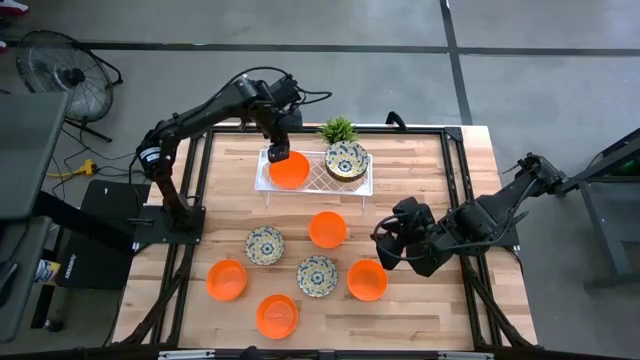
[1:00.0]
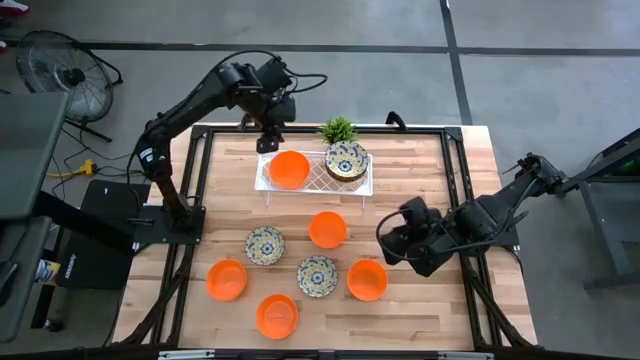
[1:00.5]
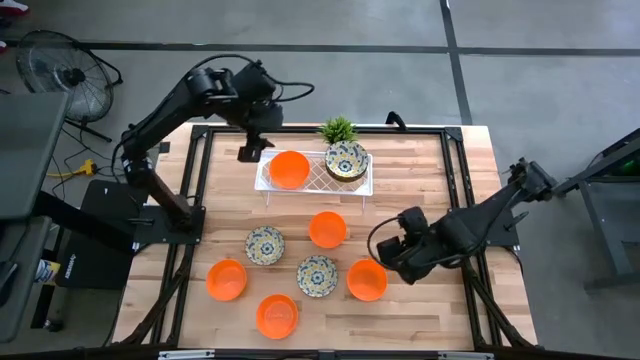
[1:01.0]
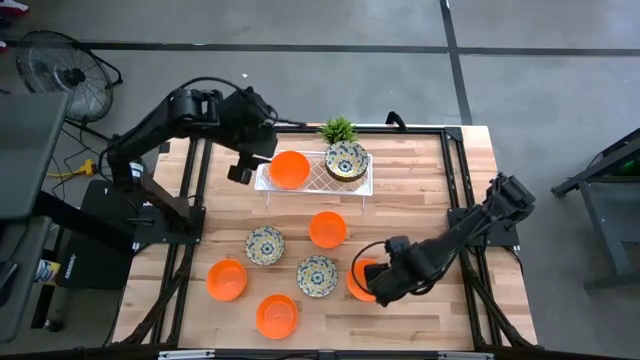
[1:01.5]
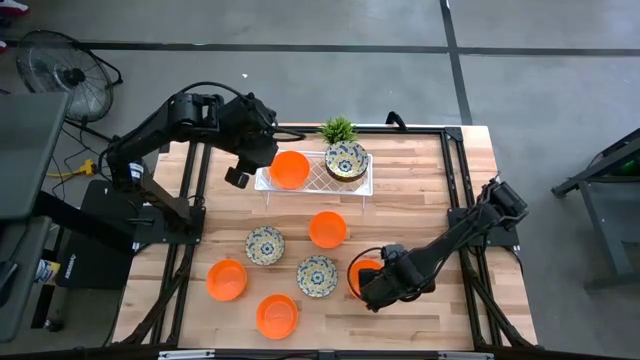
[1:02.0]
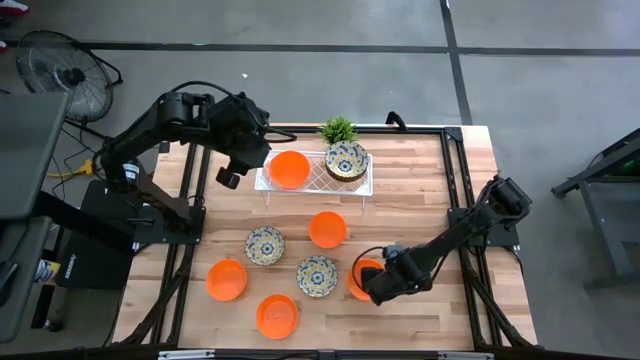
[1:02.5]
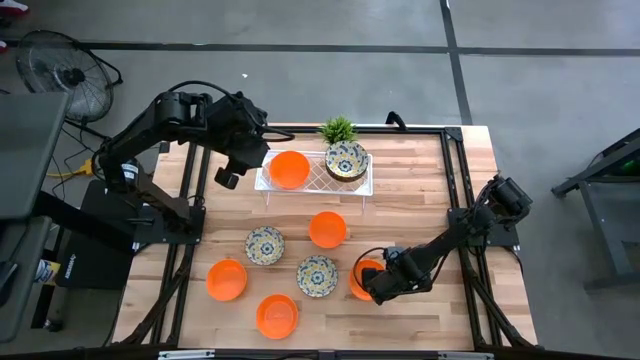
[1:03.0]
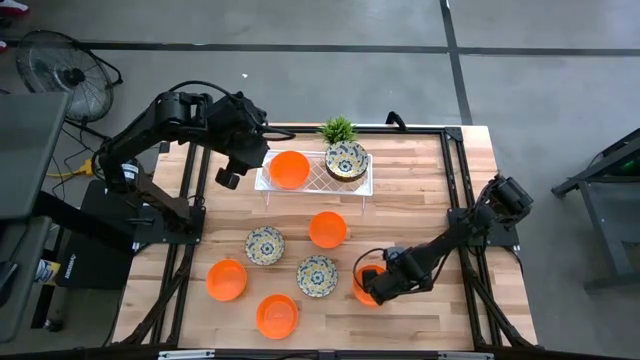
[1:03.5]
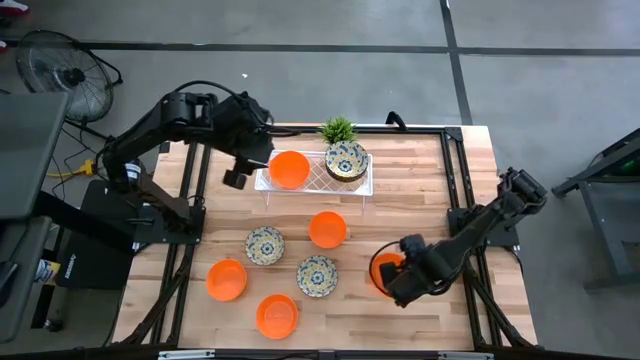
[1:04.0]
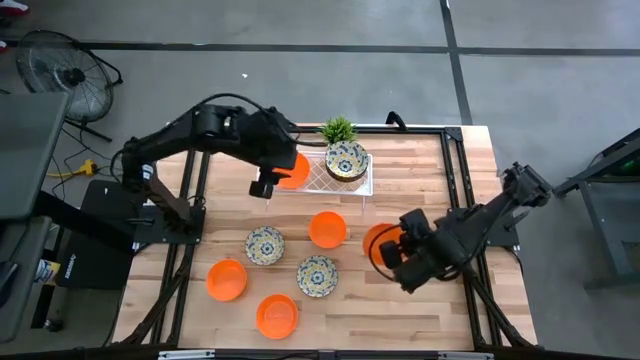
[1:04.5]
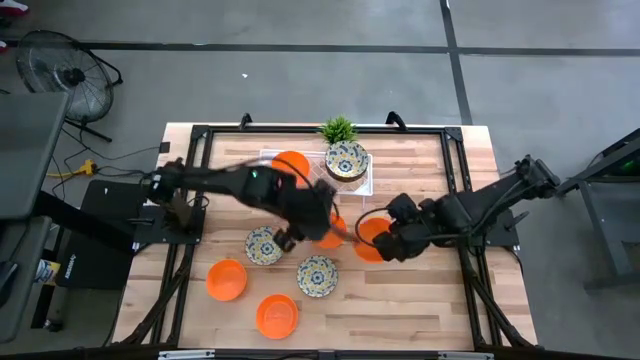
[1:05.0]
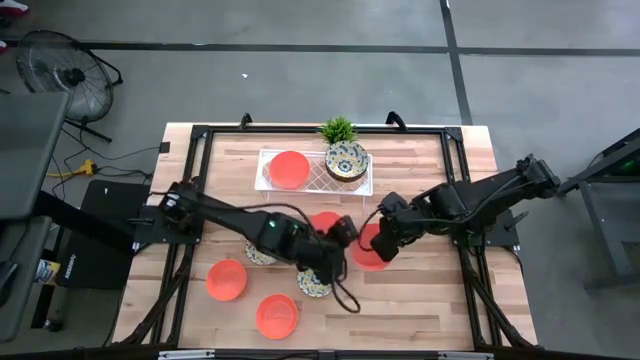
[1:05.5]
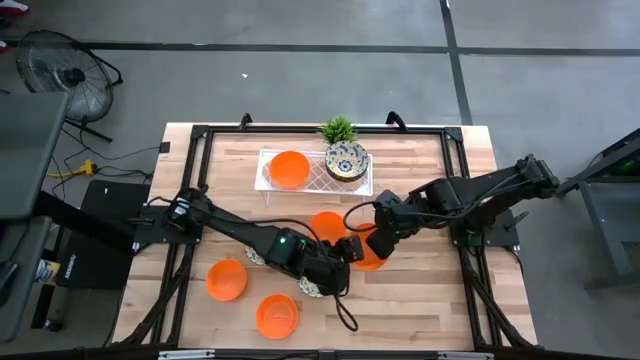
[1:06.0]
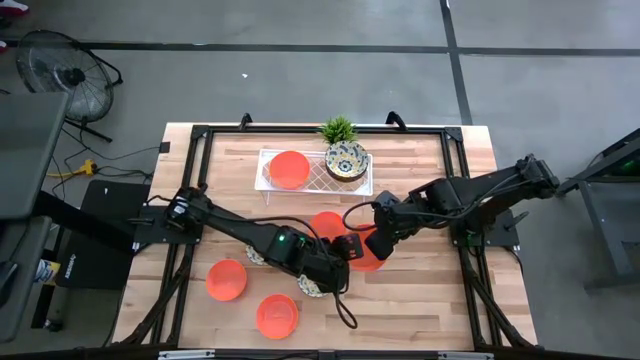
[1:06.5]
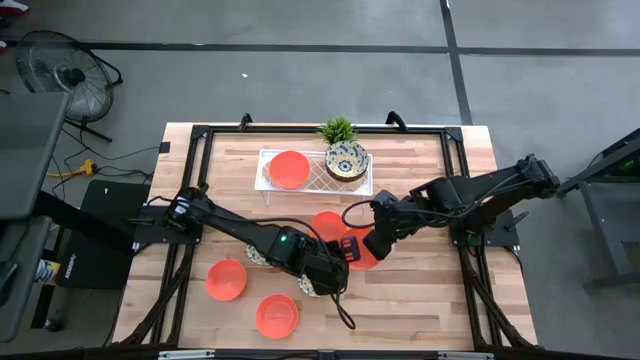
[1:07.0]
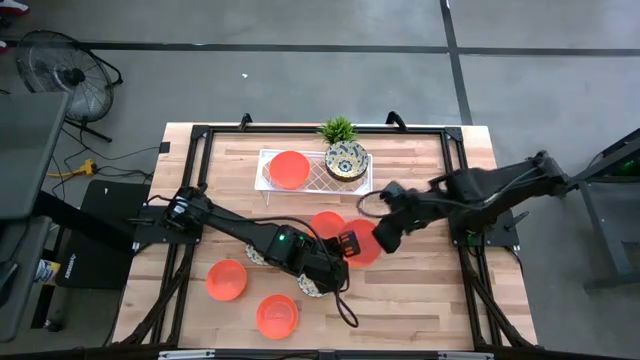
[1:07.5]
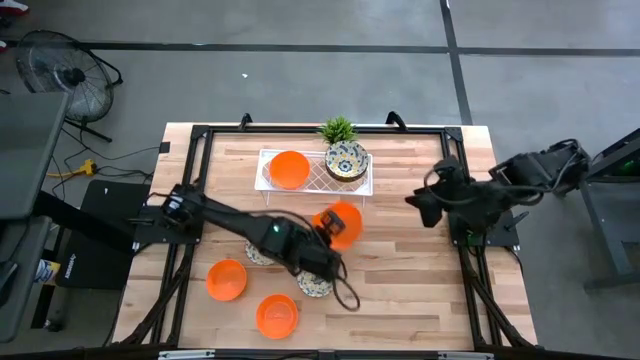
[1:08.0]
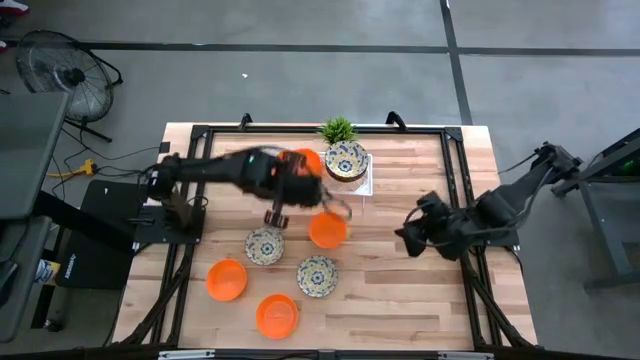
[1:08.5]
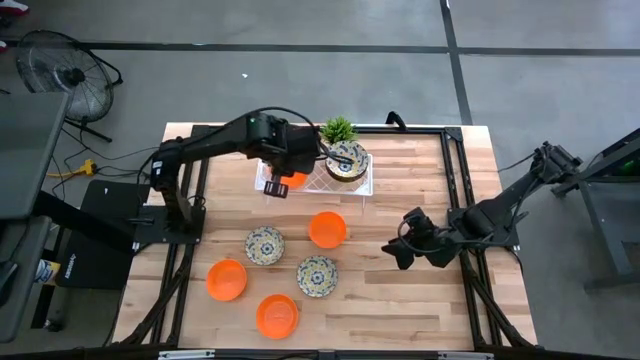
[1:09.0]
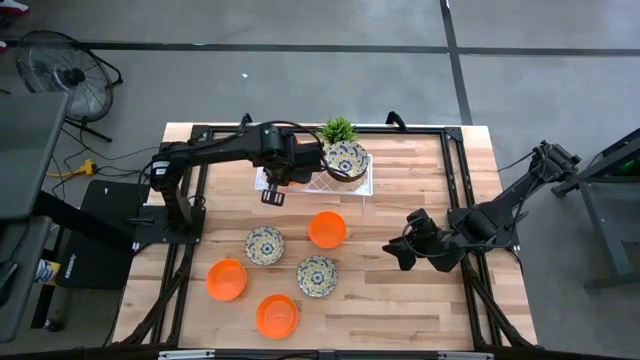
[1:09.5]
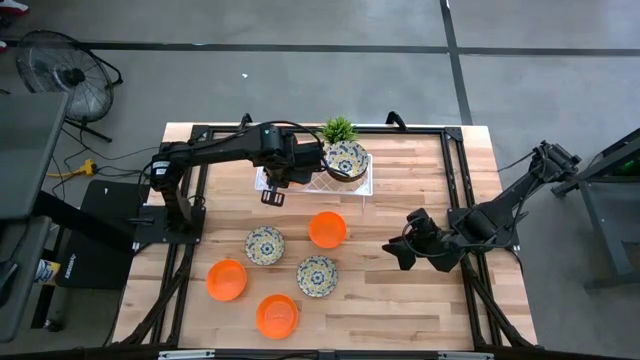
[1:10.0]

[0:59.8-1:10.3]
Task: Pick & Place Mini bowls
Stack the orange bowl on the orange bowl on the shelf

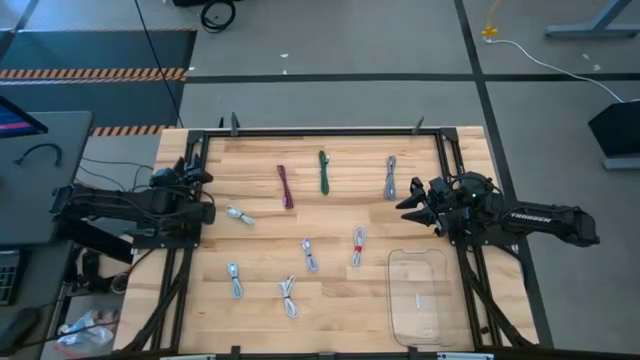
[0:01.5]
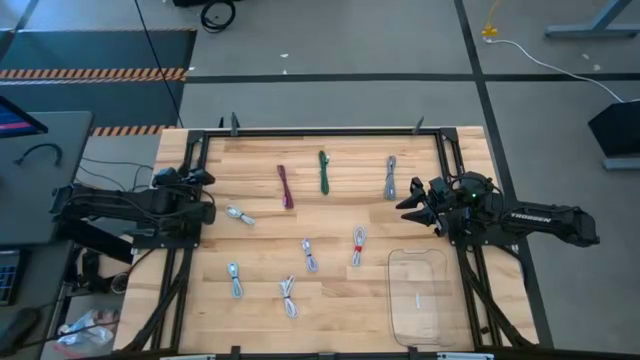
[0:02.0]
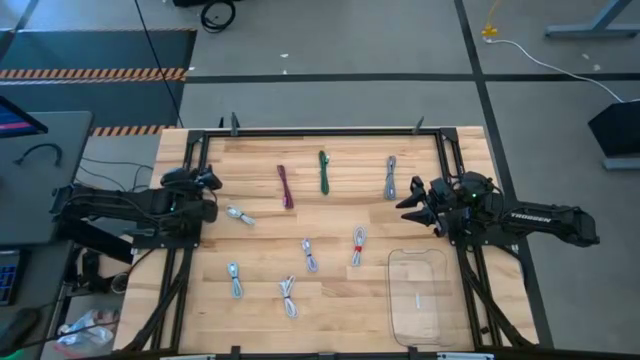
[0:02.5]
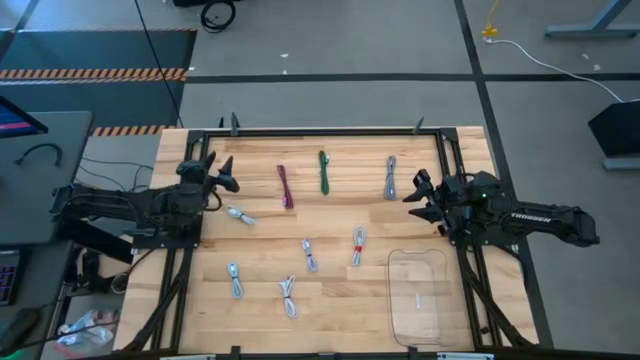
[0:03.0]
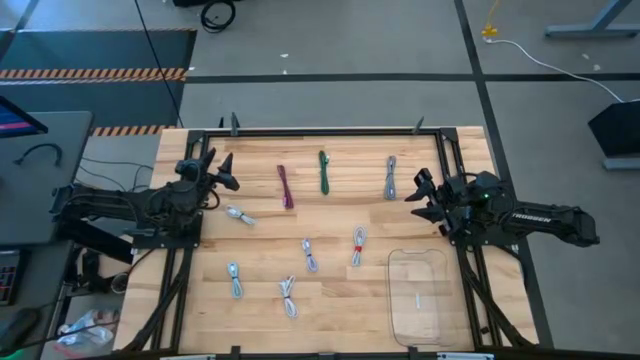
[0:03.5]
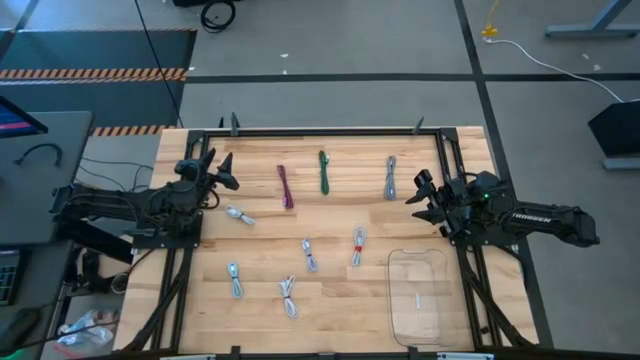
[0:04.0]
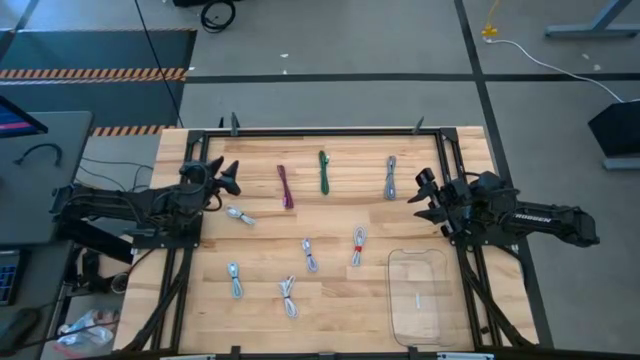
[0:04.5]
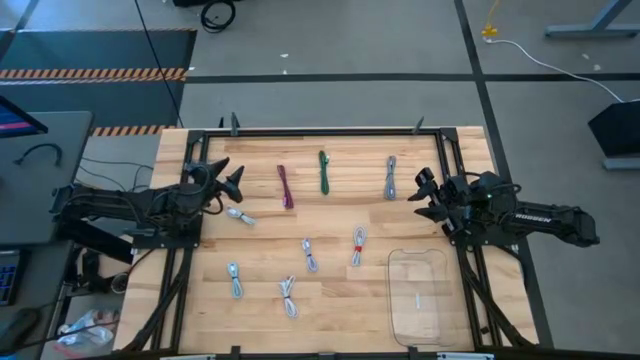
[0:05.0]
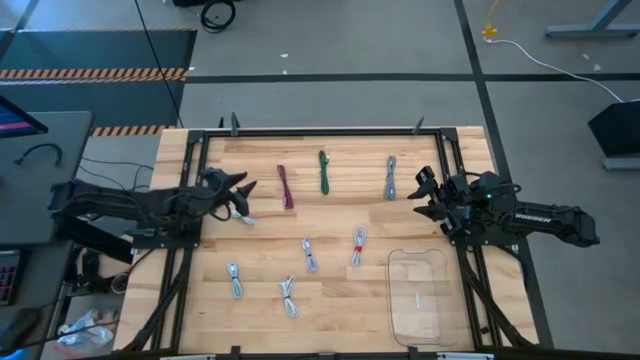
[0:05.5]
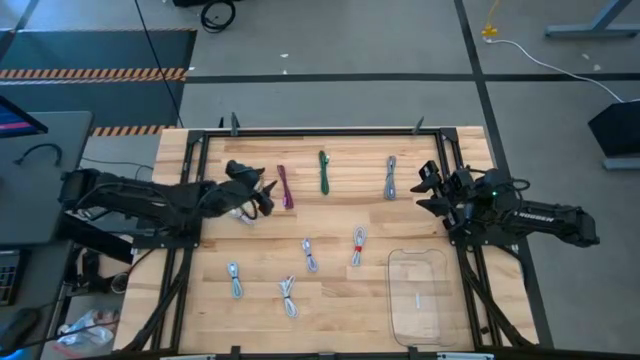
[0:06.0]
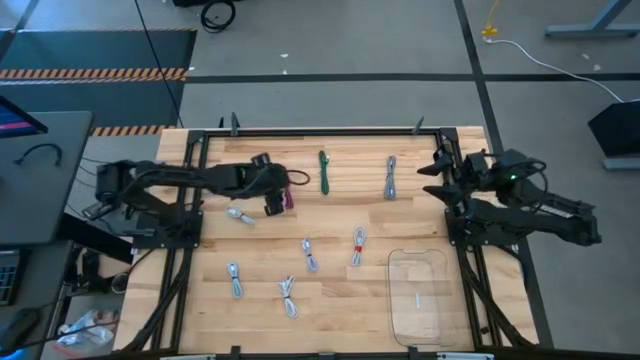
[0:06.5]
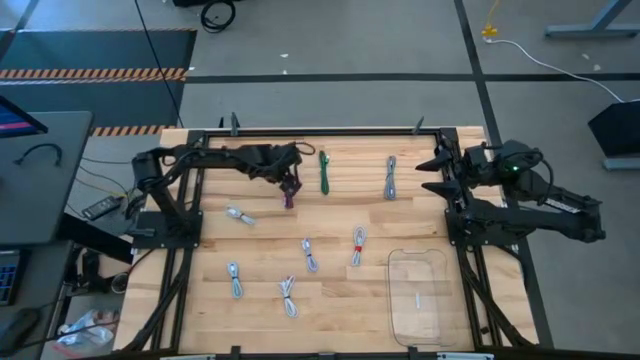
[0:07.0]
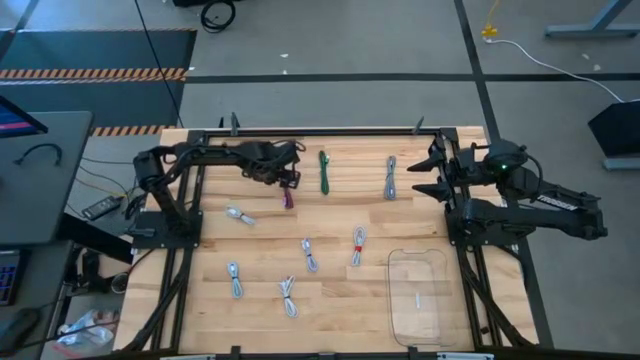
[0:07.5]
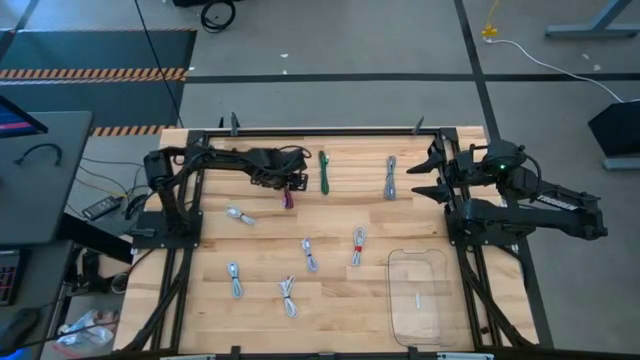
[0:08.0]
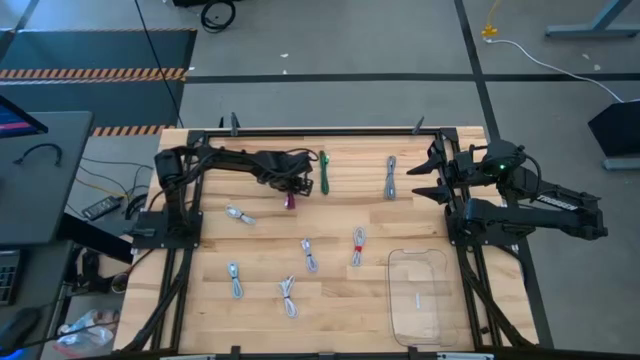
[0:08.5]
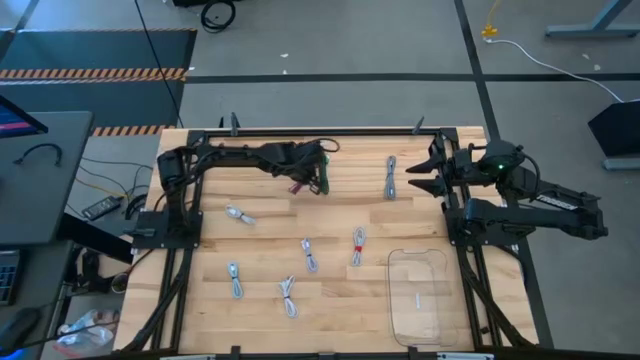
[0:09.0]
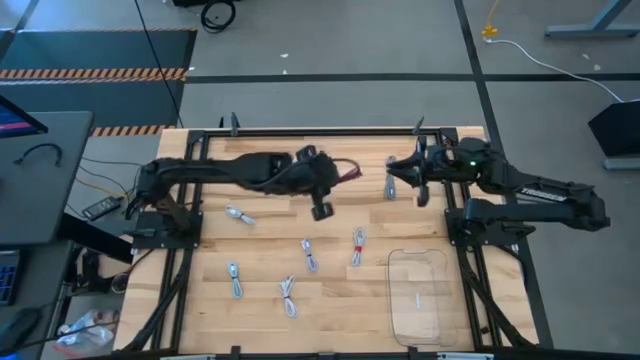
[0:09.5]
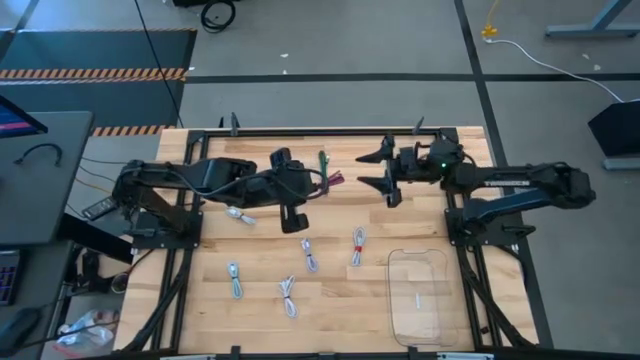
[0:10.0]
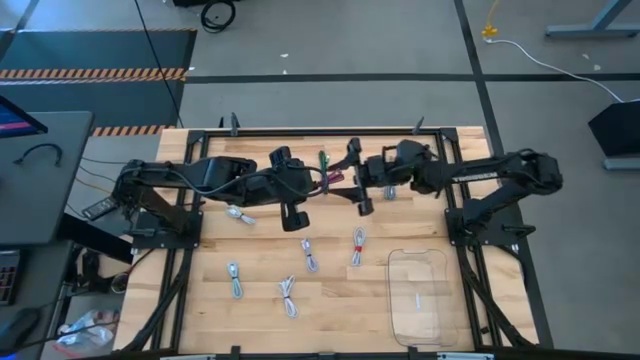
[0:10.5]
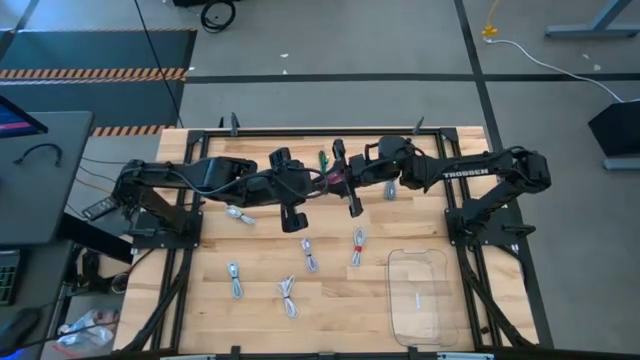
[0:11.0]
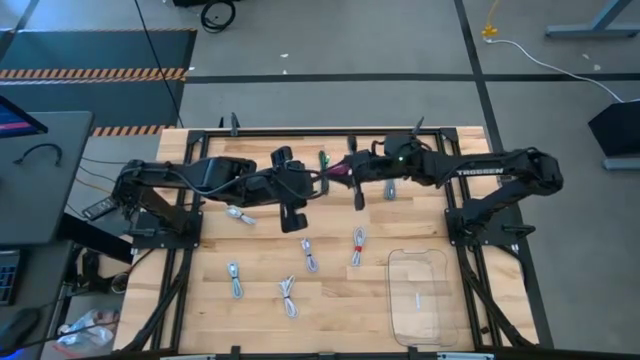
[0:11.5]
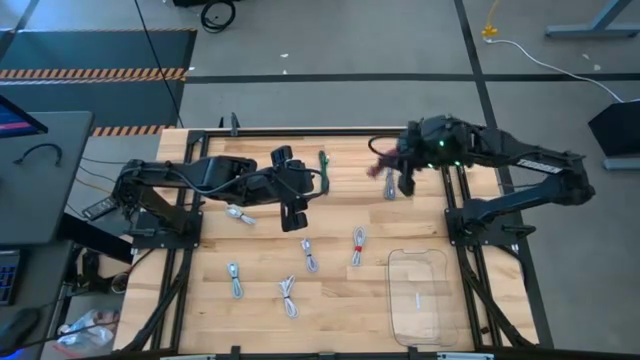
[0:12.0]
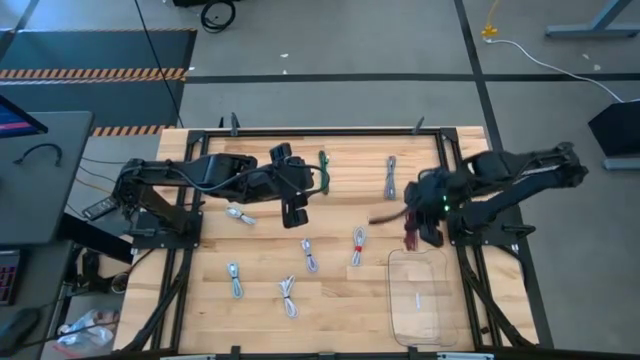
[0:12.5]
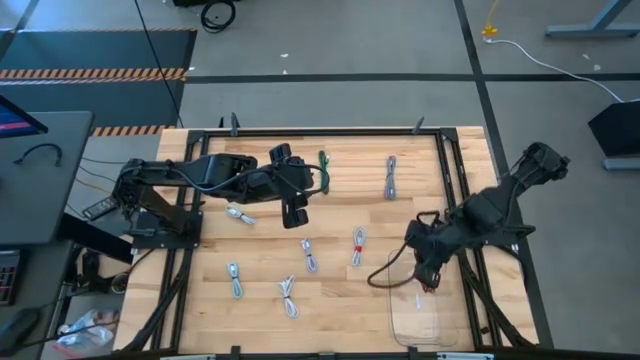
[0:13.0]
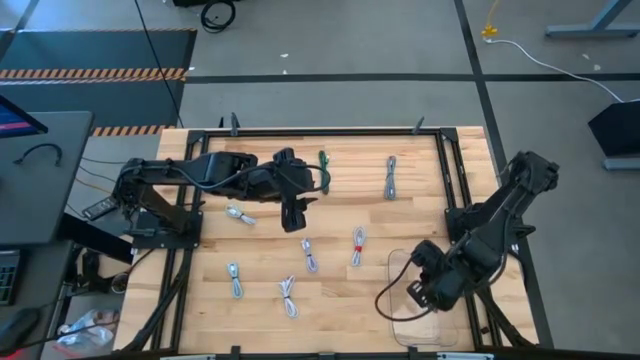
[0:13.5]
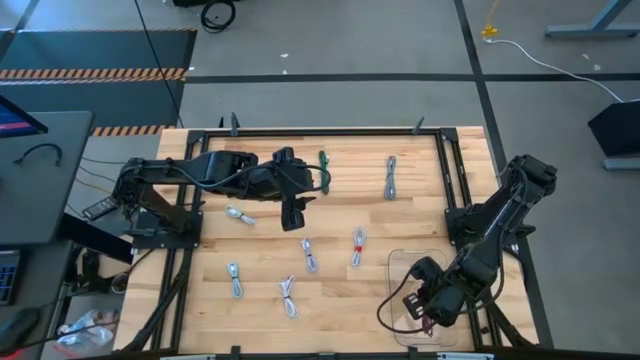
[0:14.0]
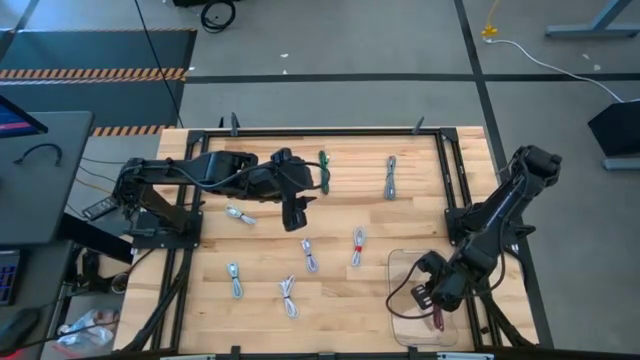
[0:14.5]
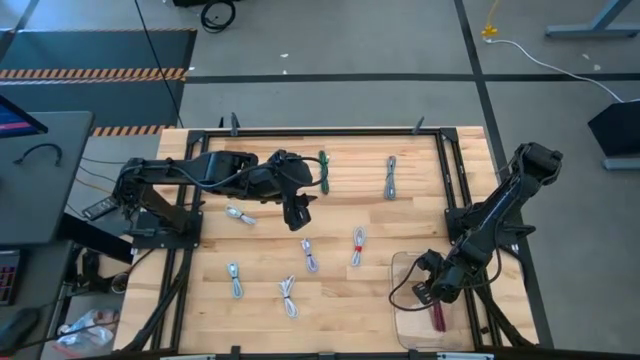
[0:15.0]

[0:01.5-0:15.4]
Task: Pick and place USB-C Cables
Put the pink charger cable into the transparent bin
